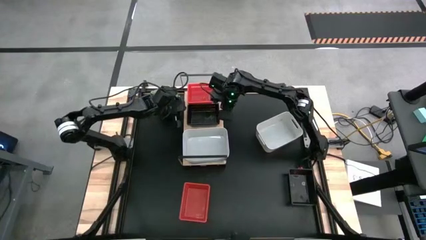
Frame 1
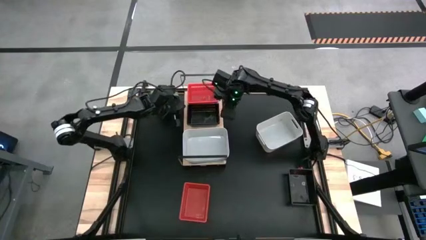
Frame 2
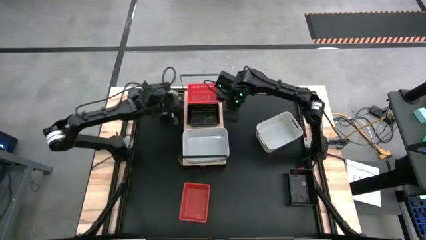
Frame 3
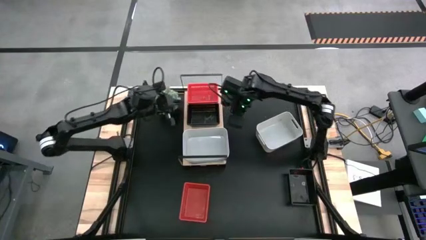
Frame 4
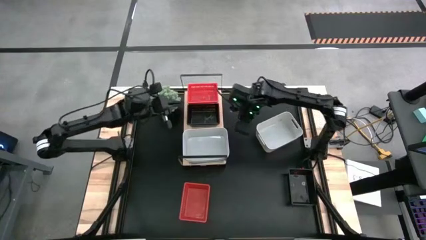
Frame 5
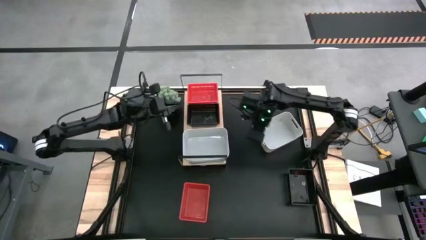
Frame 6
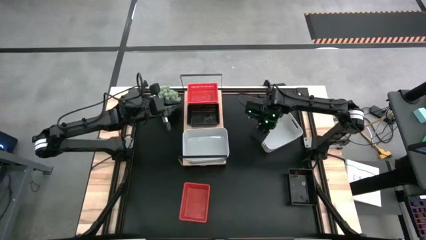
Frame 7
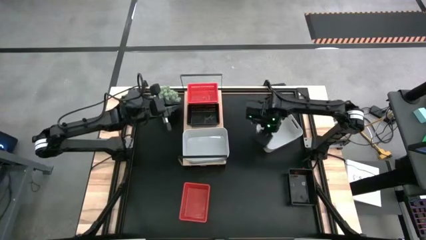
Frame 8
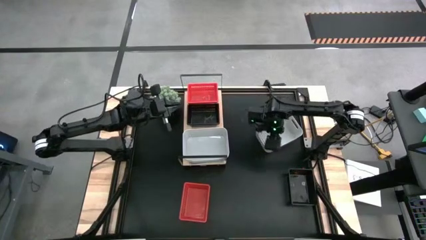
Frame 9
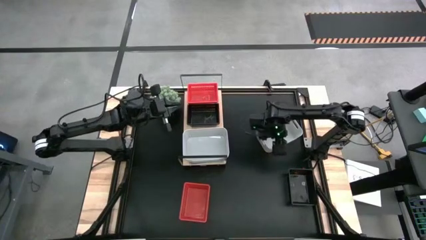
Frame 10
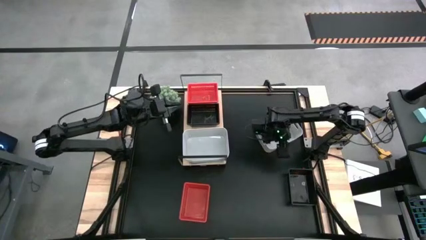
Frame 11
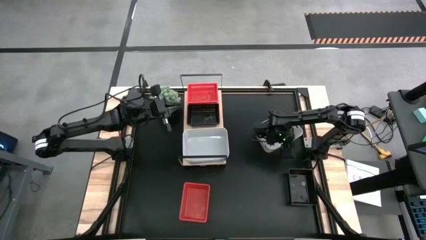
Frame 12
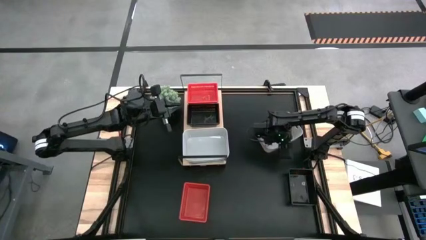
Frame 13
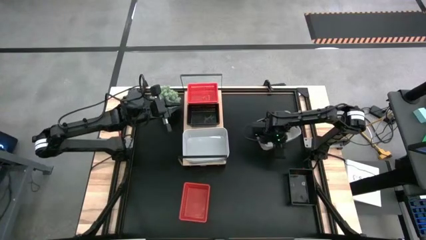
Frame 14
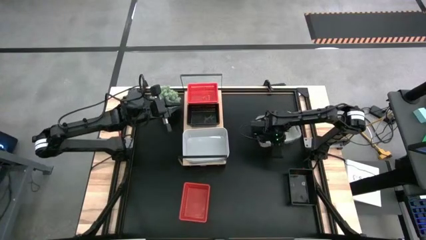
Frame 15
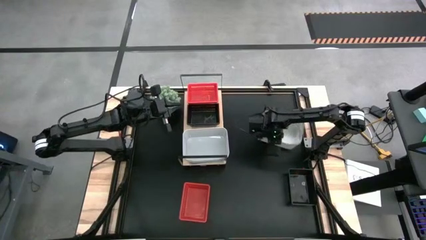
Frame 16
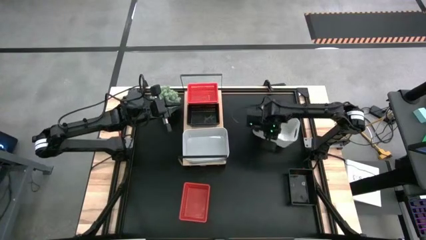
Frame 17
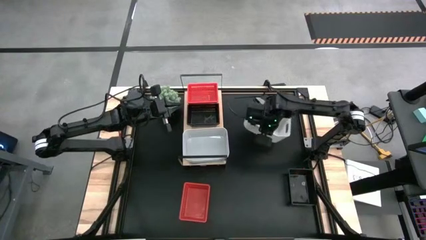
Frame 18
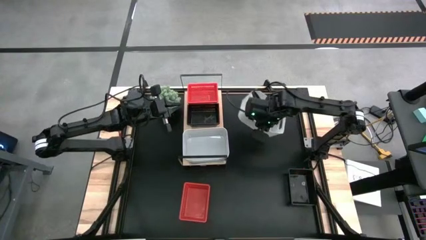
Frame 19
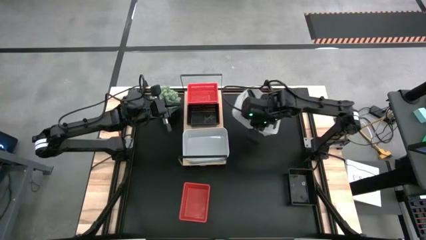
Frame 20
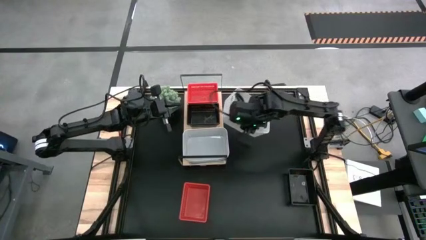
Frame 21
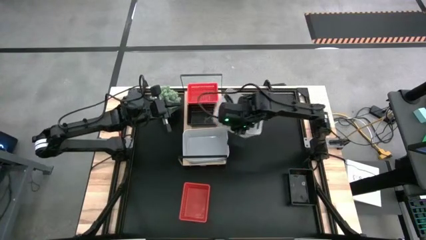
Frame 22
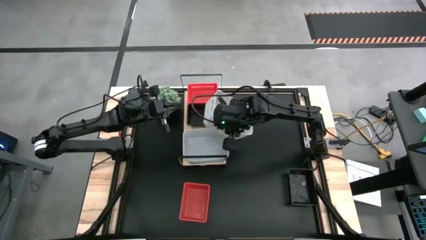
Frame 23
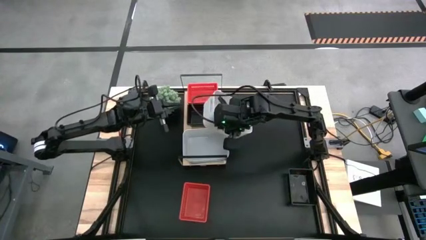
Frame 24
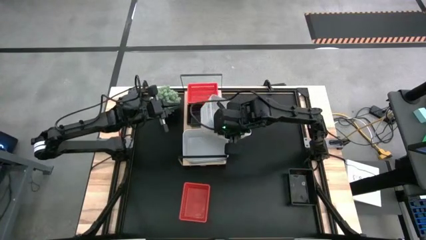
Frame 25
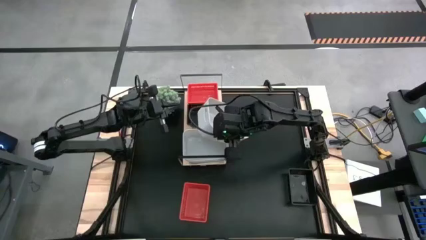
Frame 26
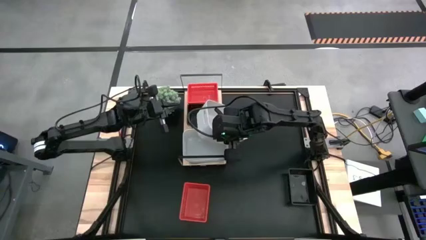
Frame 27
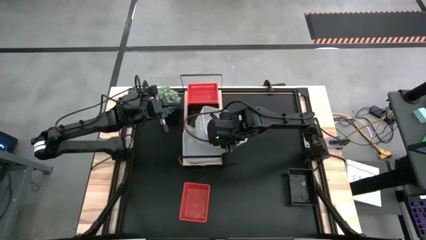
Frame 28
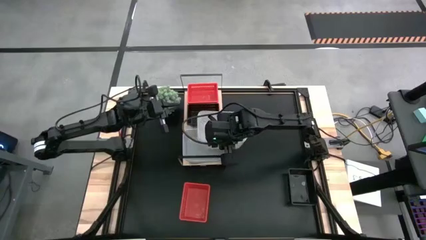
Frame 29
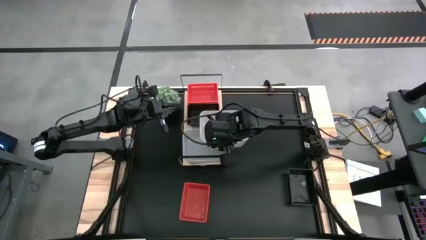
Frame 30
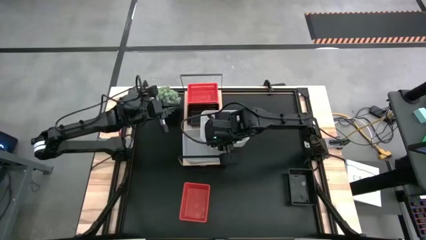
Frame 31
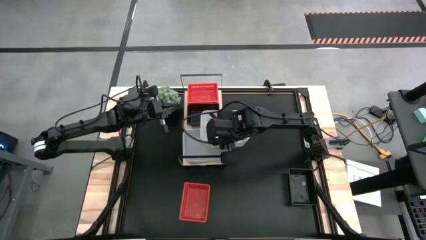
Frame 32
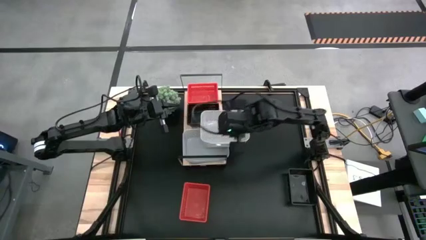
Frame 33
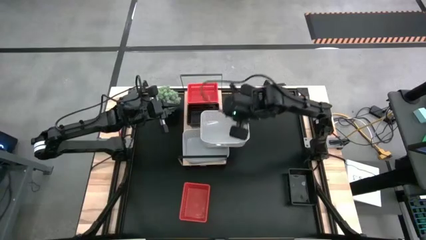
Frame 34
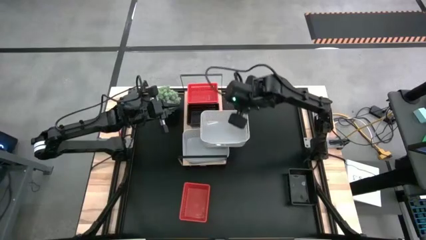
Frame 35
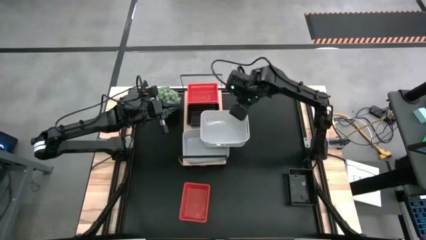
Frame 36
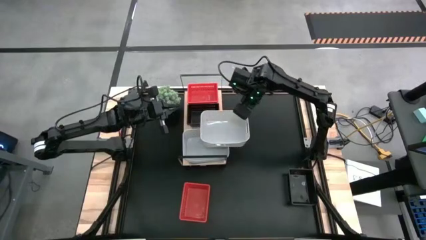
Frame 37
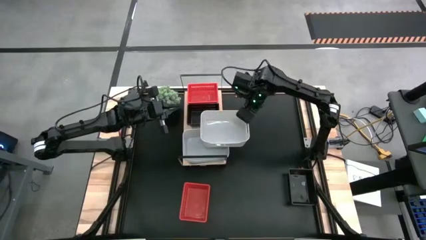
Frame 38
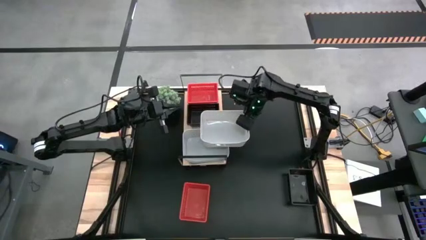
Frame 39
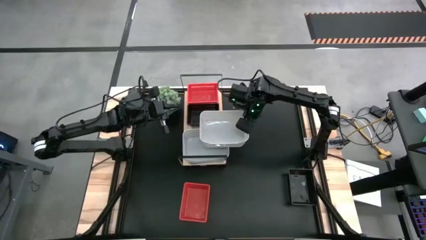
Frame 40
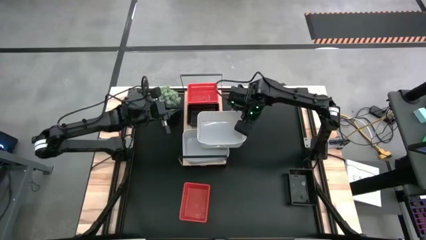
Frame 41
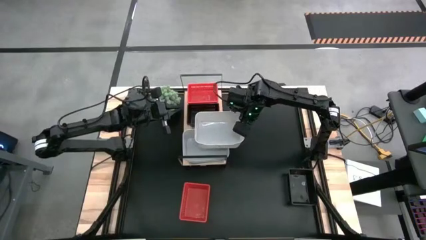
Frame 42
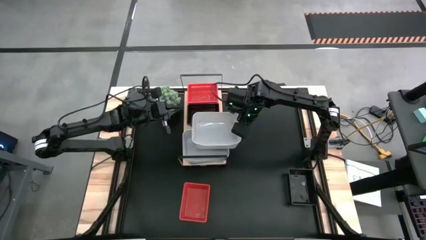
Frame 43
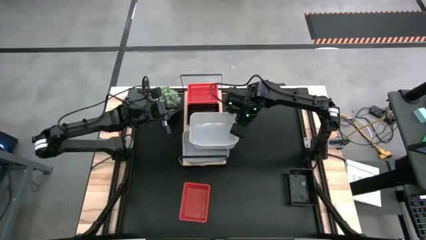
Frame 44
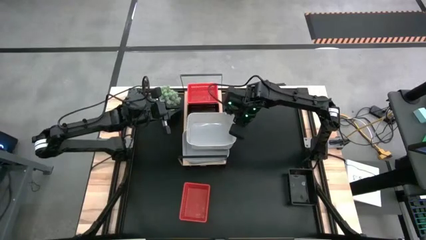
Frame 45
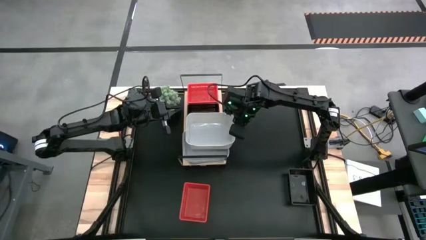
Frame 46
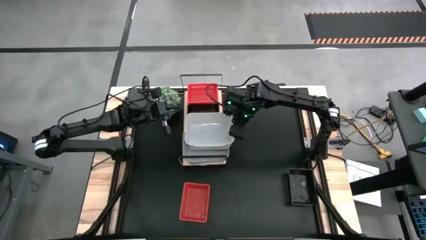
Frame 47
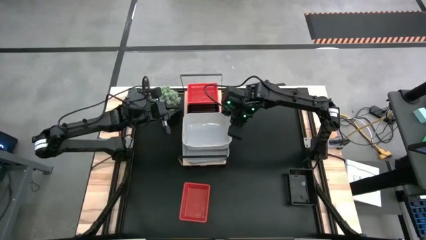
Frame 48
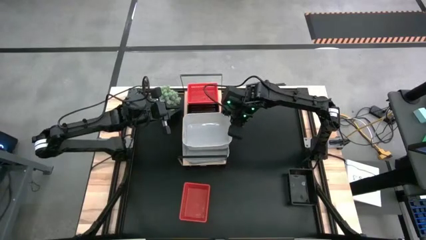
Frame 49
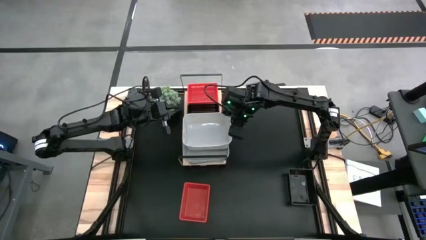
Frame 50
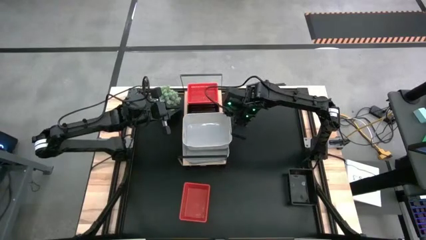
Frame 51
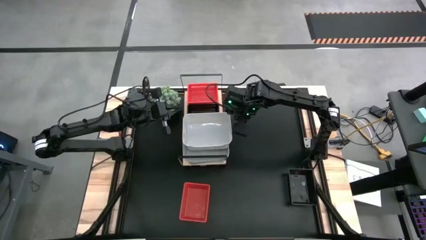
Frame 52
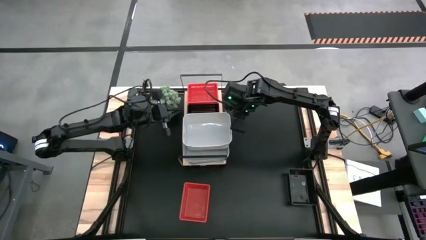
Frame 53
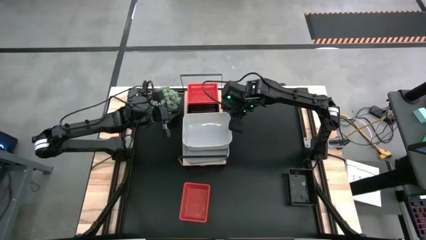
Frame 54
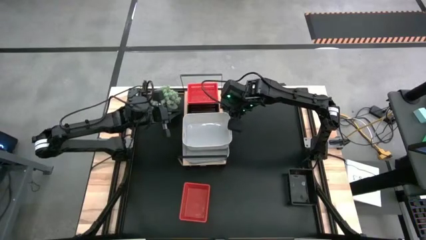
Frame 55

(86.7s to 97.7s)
Task: Stack baskets on shelf by color
Stack the gray bin on top of the gray bin on the shelf

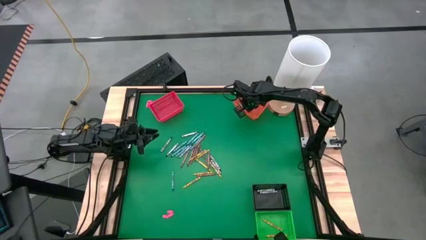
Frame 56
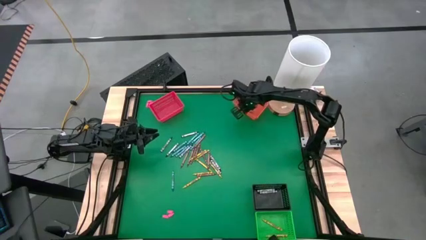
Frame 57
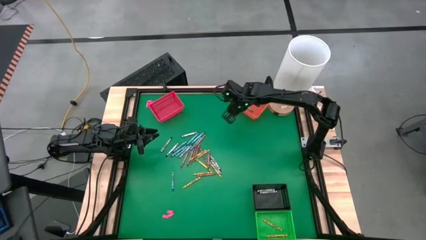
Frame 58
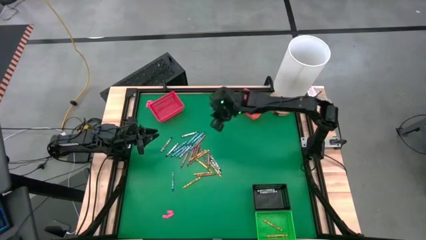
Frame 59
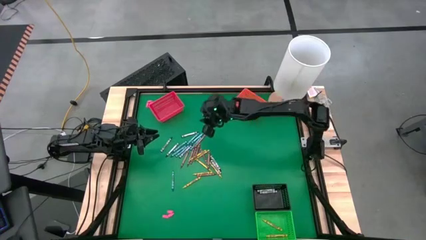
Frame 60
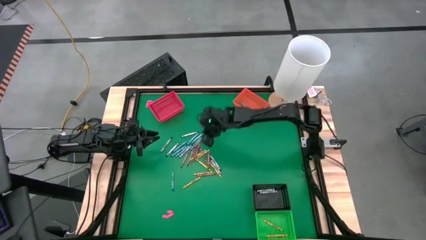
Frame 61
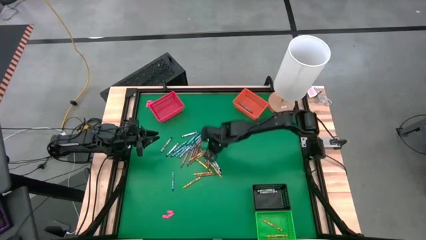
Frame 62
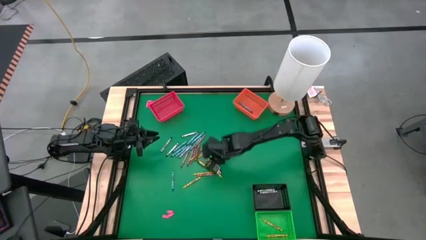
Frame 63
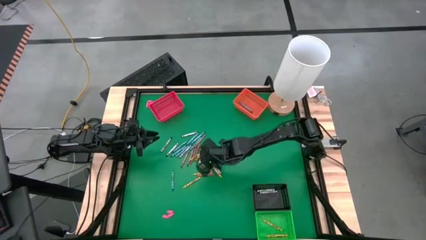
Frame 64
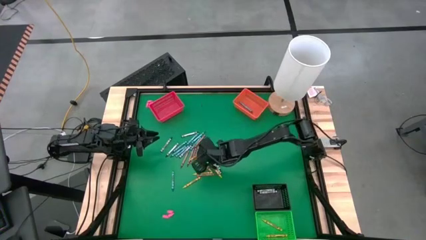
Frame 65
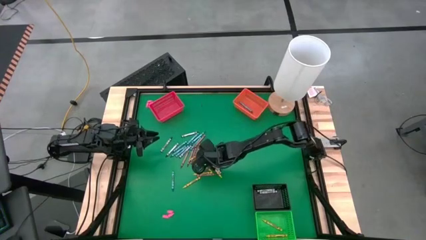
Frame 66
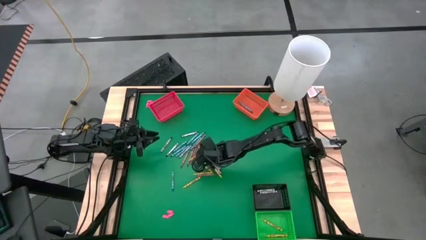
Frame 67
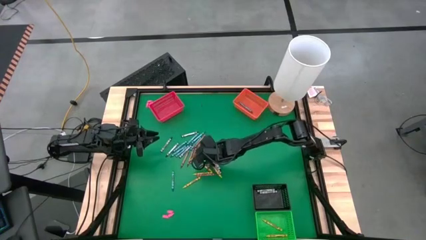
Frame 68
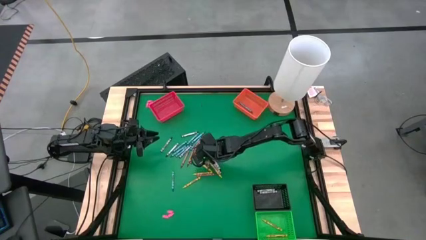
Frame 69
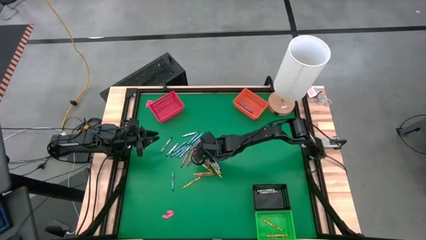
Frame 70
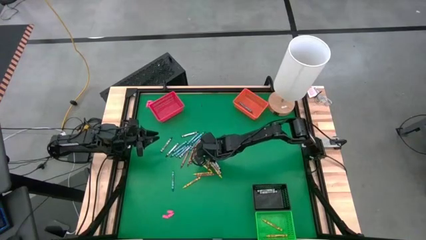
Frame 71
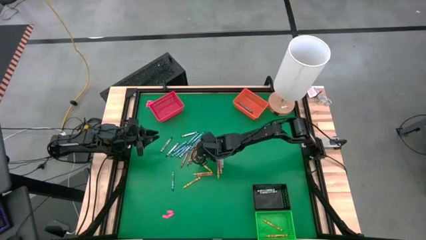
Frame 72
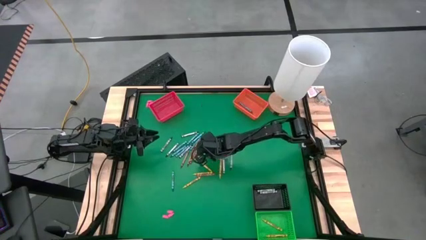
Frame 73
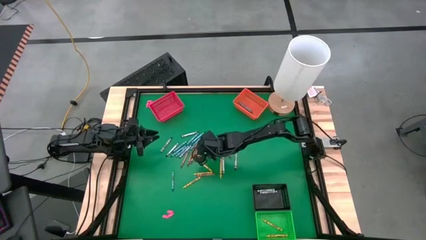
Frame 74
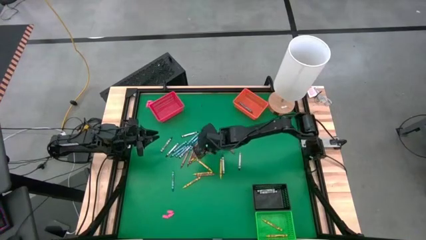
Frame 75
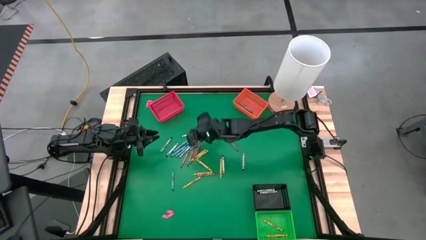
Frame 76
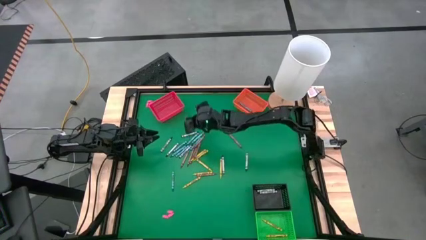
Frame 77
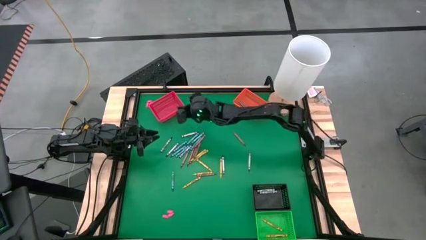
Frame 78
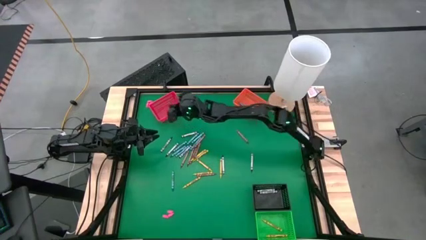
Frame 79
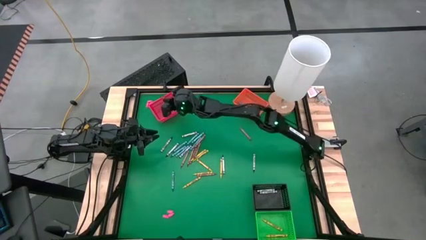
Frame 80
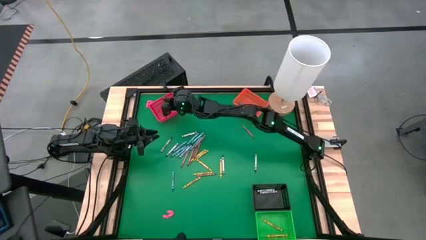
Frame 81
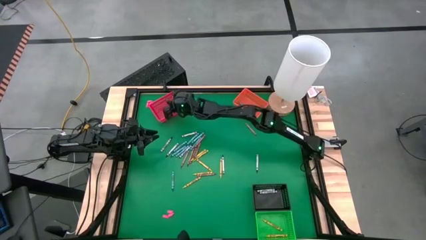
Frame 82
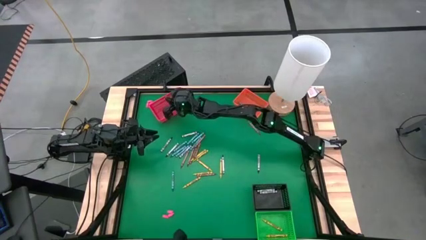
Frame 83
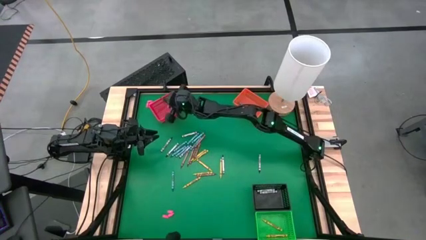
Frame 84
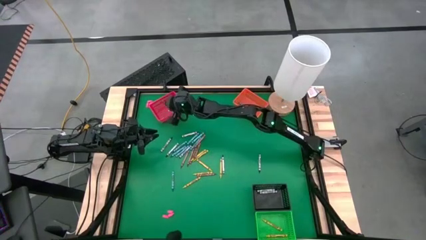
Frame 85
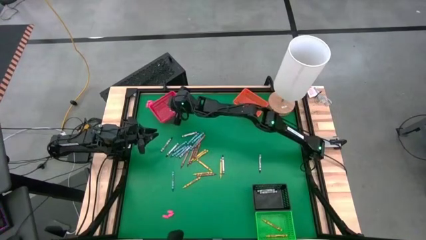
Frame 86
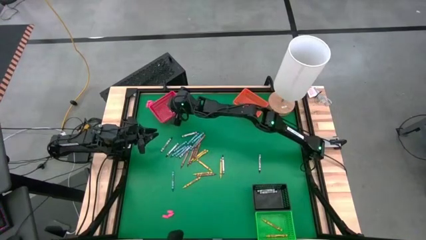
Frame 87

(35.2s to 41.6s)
Task: Sort crayons
Put the brown crayon into the red bin
